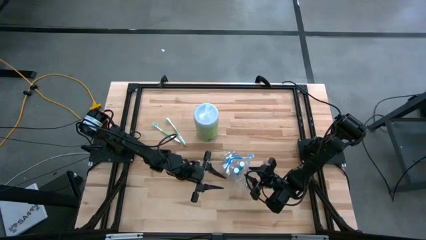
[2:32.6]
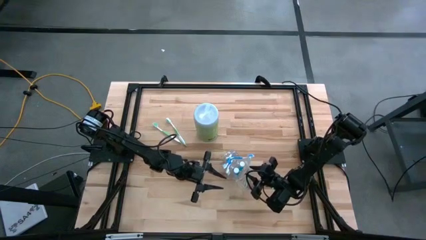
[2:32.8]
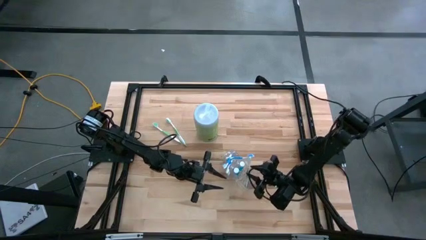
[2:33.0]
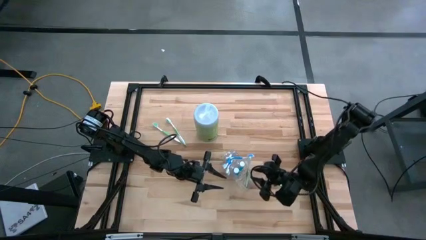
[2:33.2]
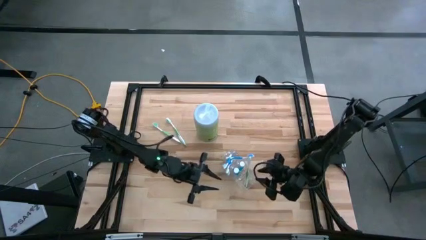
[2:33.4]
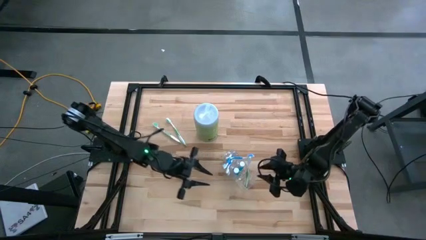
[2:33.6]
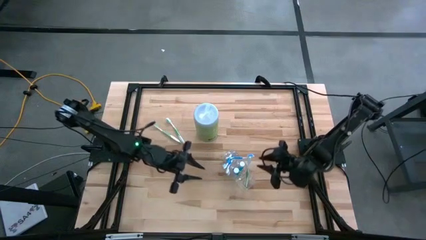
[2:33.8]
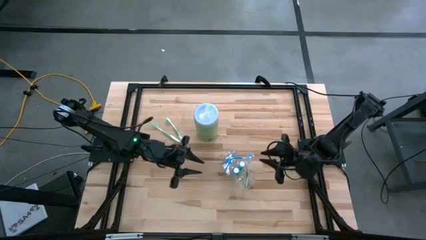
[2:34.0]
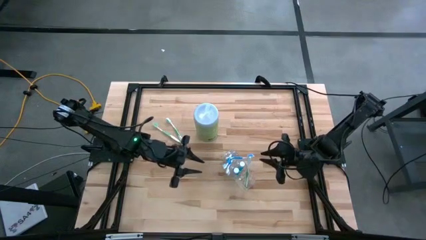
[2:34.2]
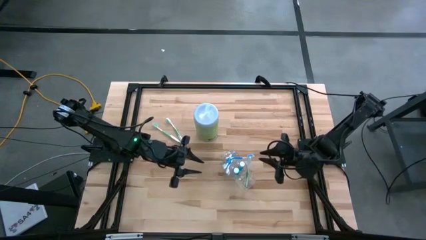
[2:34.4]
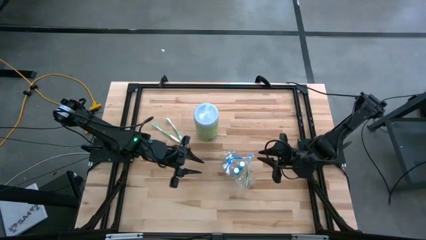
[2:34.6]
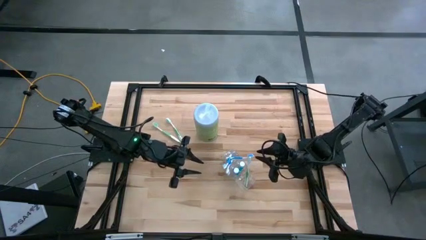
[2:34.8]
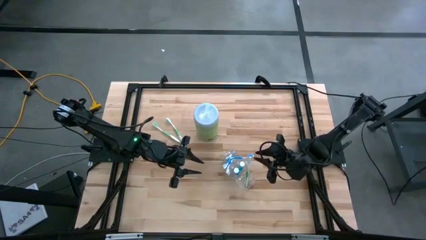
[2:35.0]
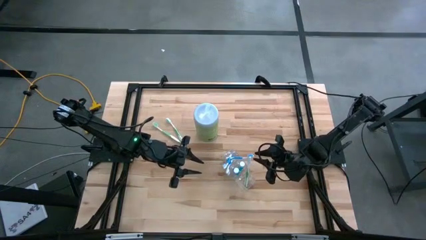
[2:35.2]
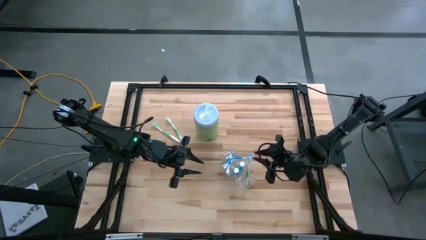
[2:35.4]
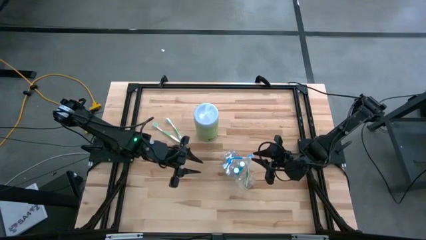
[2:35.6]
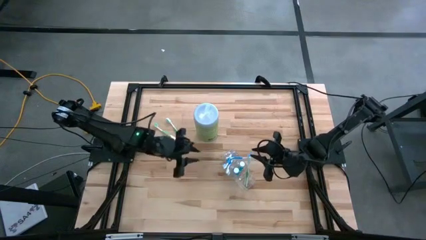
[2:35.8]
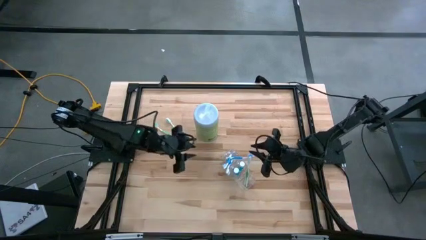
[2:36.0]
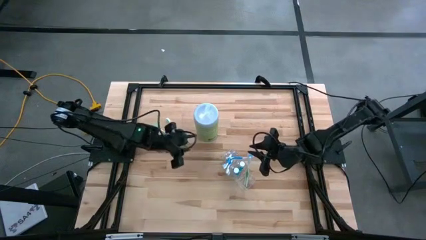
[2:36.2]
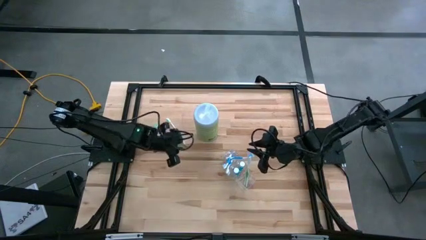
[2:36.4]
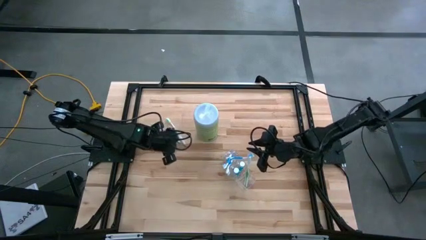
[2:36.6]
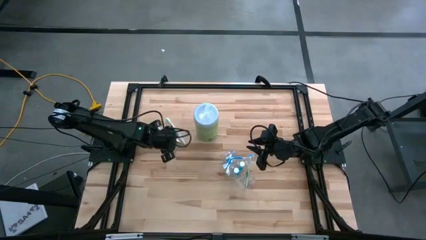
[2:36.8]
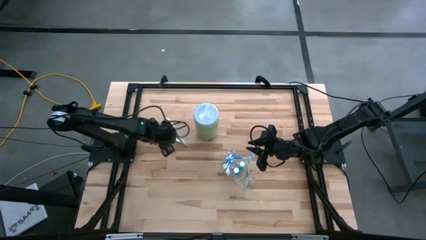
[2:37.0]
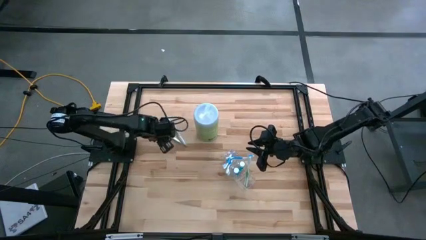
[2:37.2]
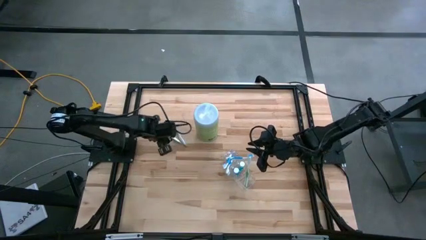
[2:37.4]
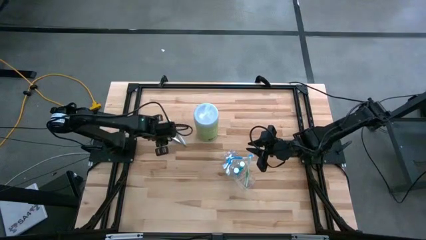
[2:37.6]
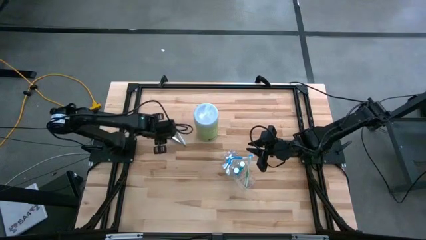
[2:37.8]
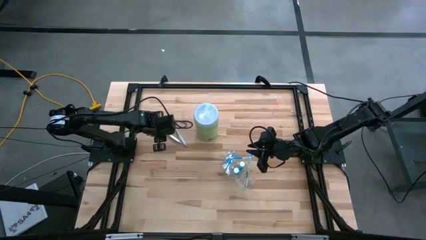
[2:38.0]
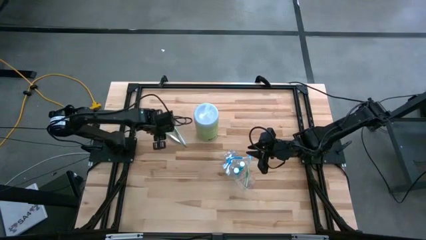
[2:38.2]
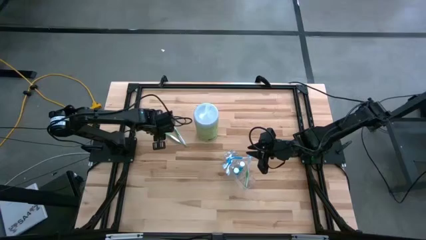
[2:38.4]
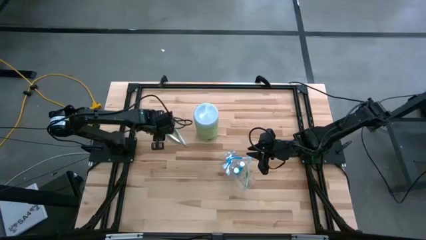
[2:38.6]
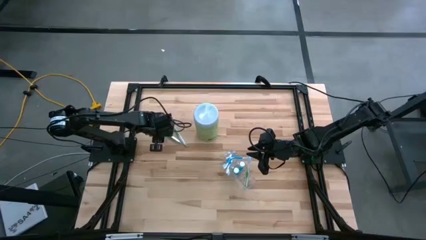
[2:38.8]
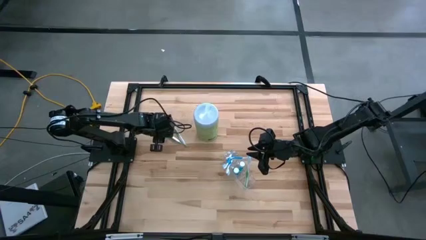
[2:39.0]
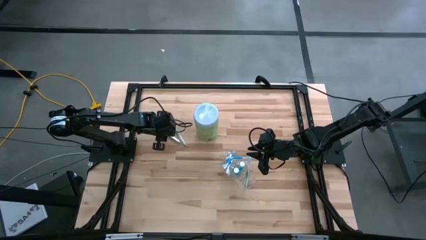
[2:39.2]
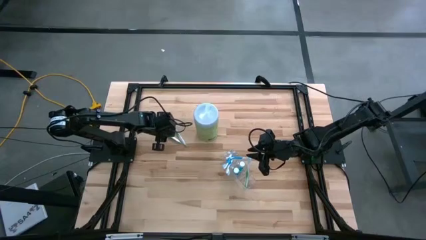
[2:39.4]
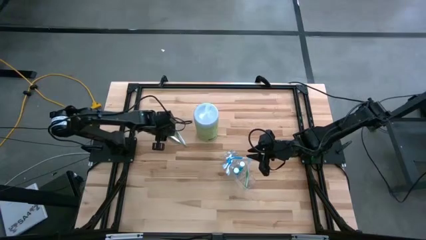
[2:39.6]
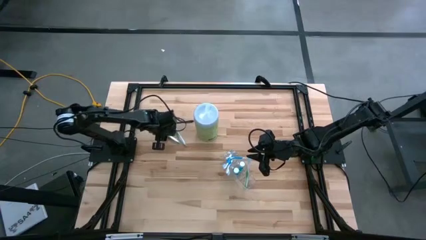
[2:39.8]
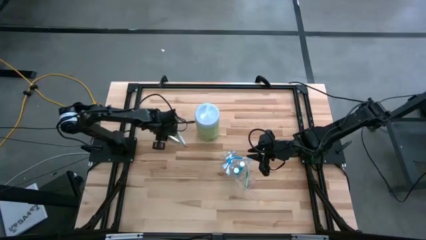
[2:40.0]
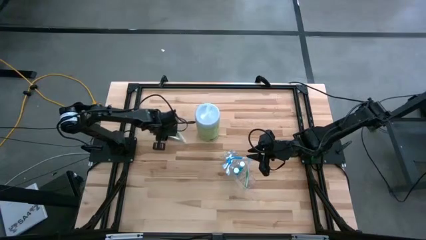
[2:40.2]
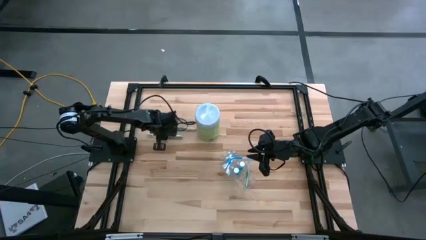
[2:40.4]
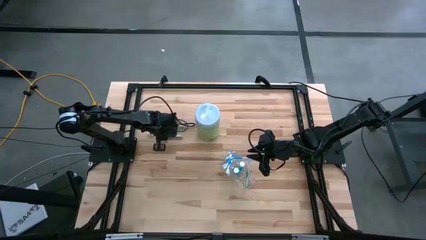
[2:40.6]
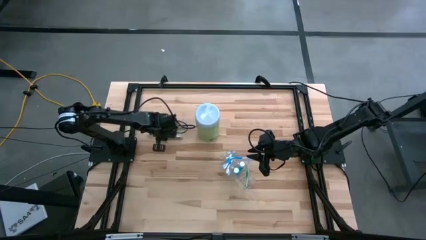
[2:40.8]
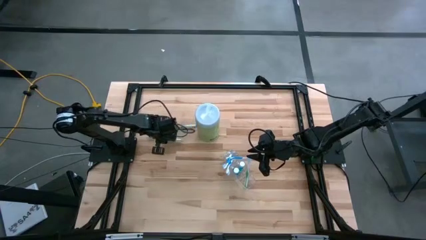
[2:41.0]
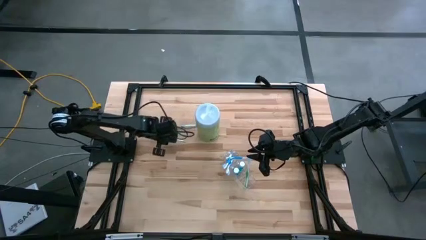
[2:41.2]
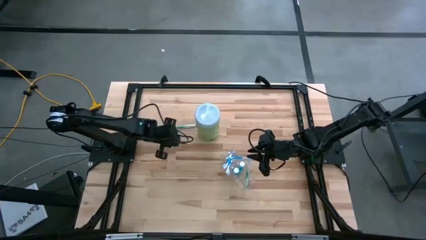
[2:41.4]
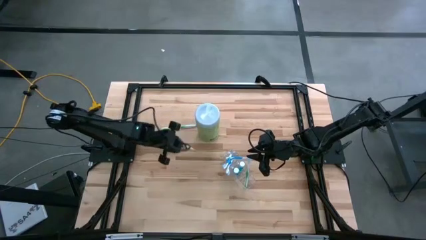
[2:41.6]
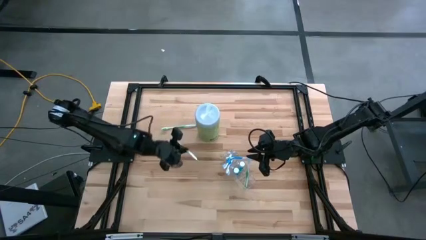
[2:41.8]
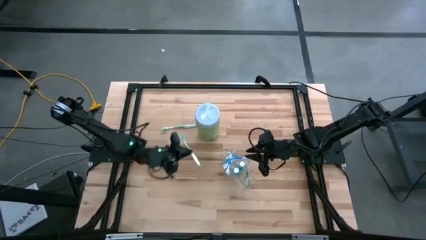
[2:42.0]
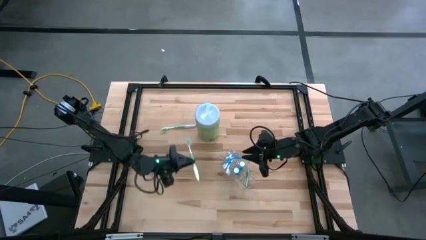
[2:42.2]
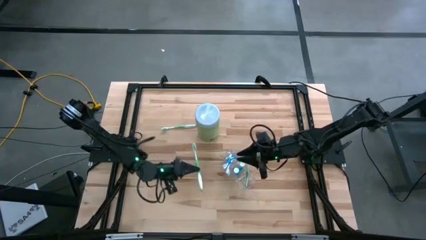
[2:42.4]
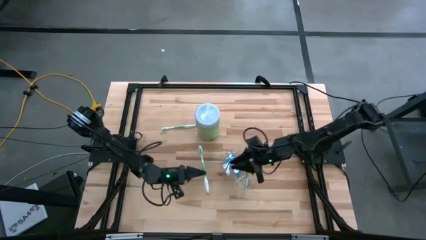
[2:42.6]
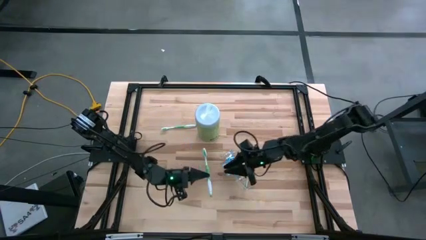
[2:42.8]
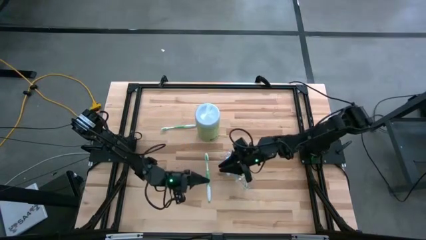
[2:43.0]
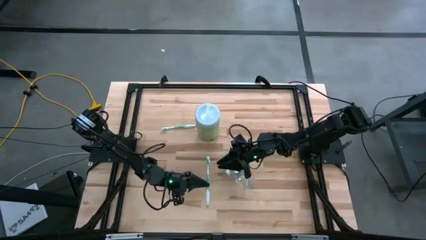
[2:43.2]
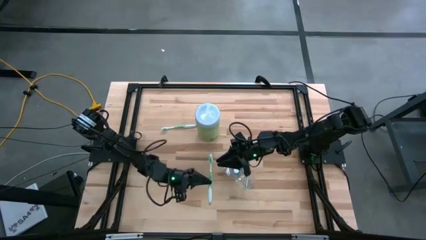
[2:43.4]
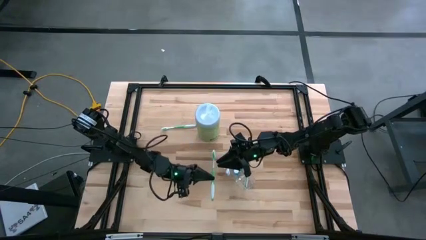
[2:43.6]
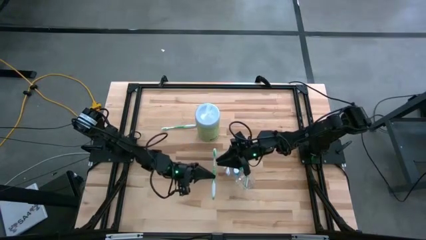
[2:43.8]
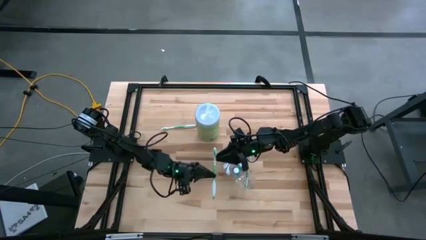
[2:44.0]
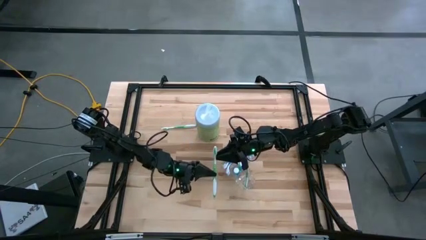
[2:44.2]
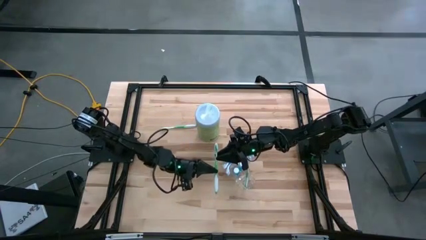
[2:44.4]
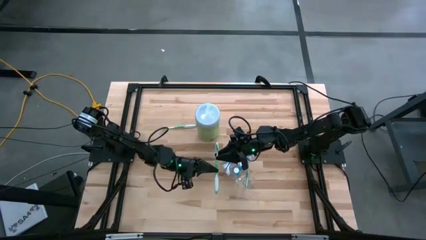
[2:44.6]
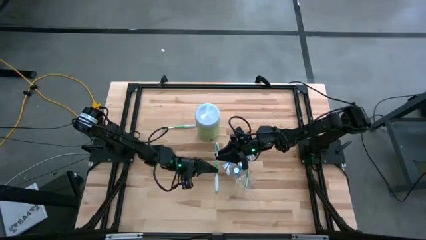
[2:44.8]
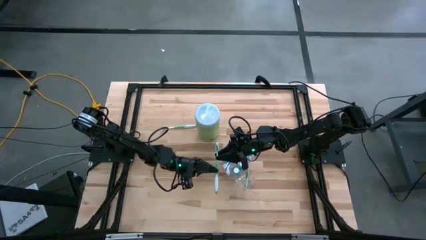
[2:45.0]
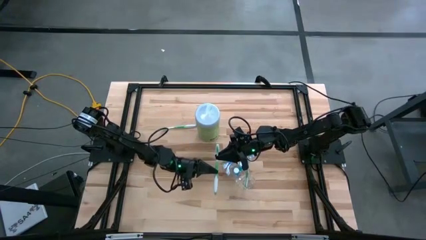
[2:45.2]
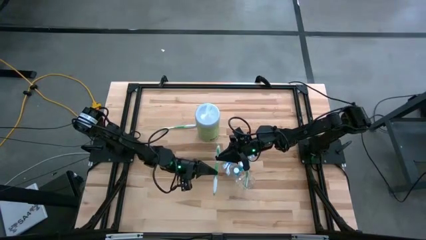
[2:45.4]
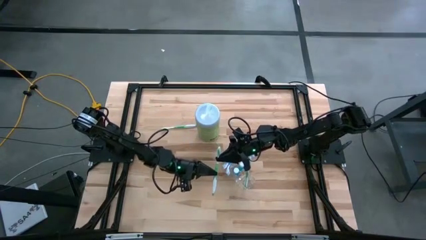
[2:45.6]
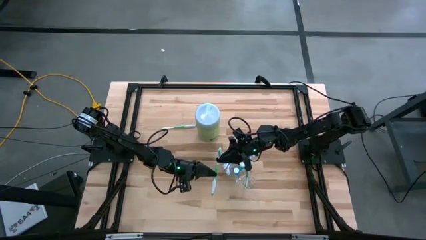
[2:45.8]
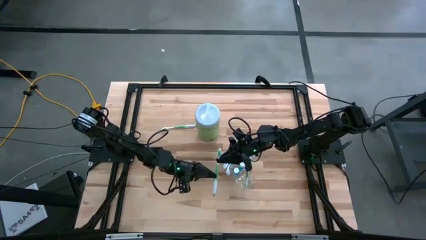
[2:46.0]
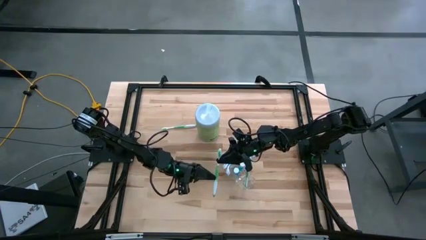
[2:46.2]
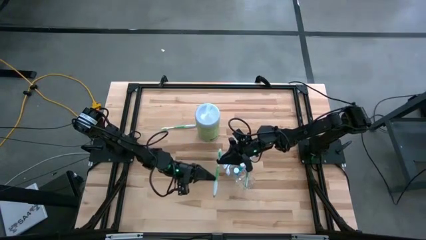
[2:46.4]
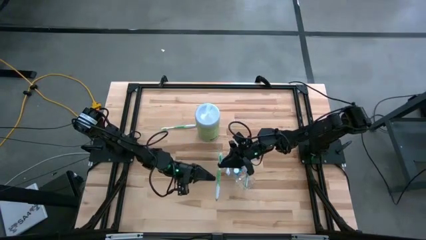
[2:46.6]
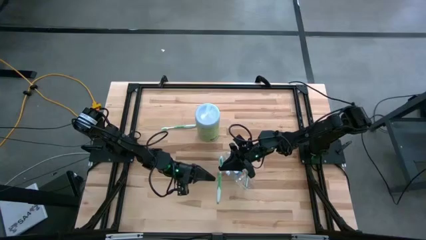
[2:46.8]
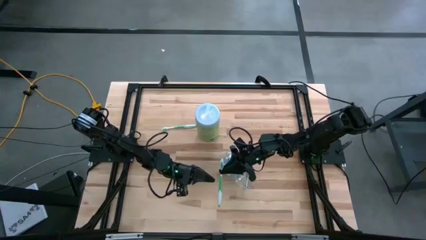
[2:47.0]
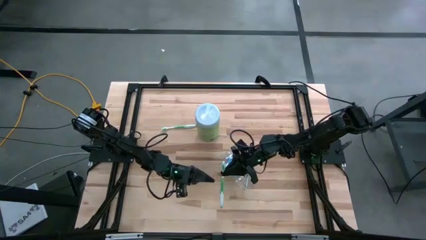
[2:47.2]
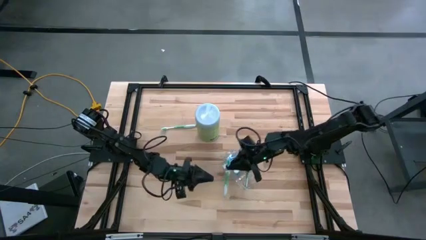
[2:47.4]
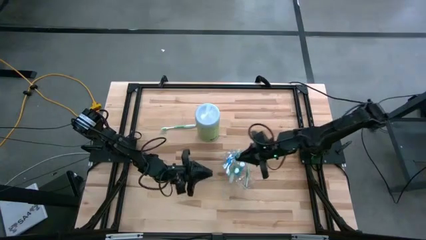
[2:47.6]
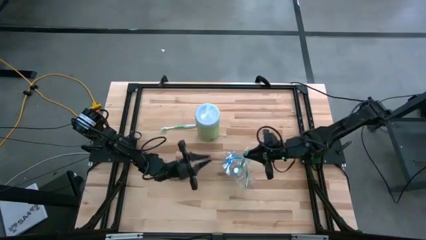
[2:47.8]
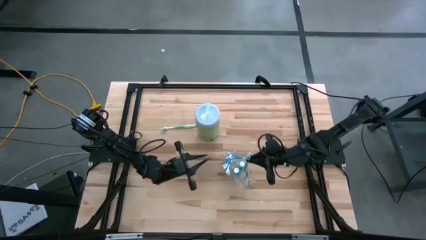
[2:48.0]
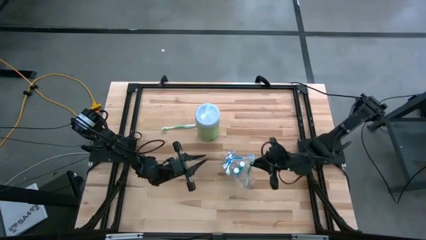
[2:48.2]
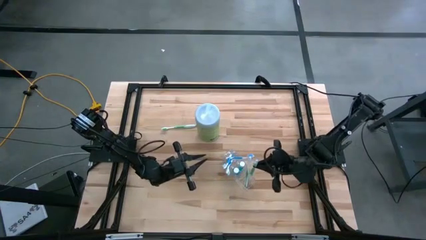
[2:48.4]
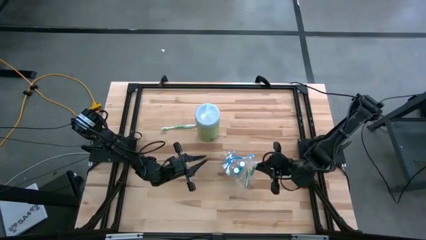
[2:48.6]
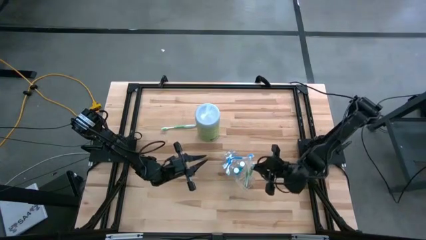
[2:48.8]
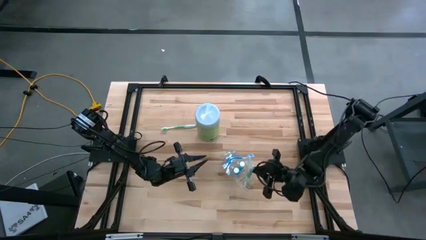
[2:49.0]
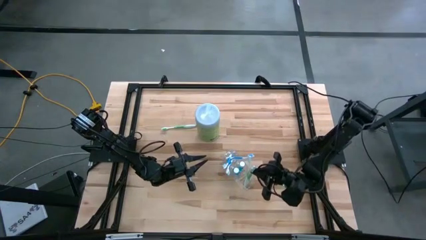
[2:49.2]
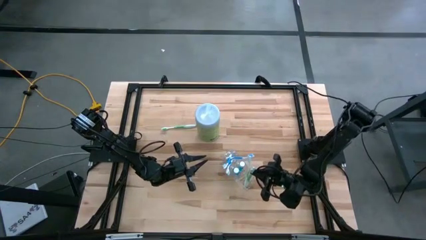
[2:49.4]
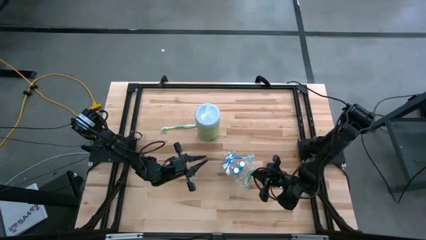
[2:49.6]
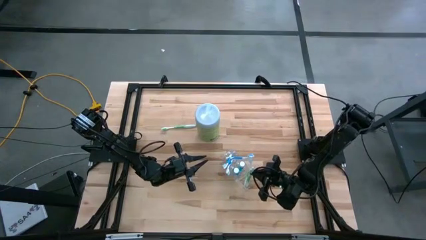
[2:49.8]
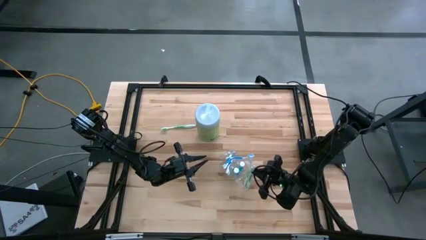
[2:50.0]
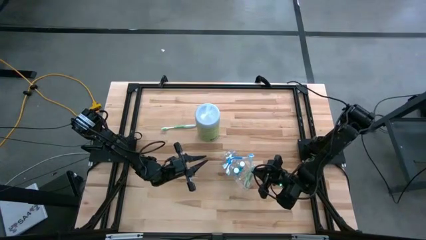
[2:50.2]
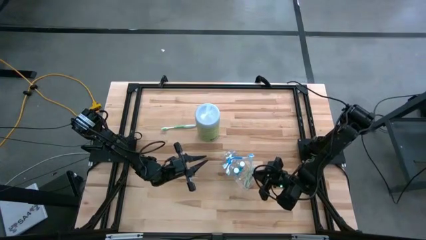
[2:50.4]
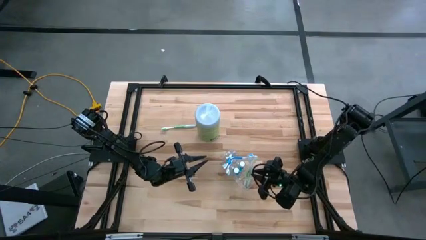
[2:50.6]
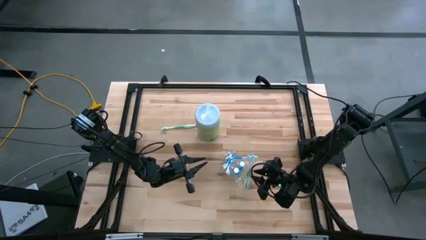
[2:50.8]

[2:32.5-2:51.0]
Task: Pick & Place toothbrushing station
Put the bottom green toothbrush into the transparent organizer
